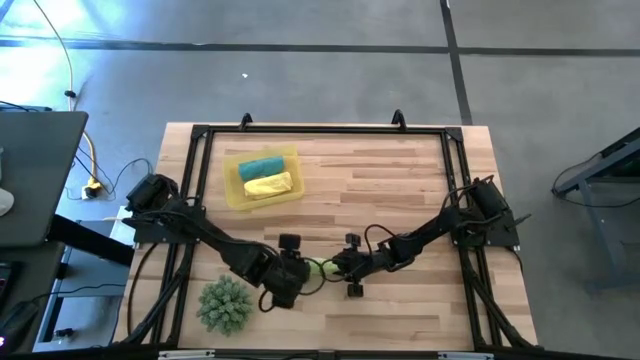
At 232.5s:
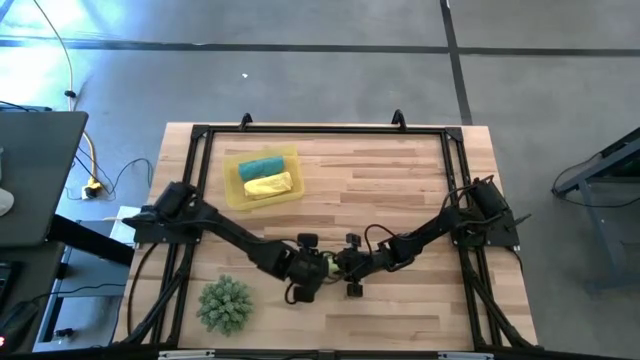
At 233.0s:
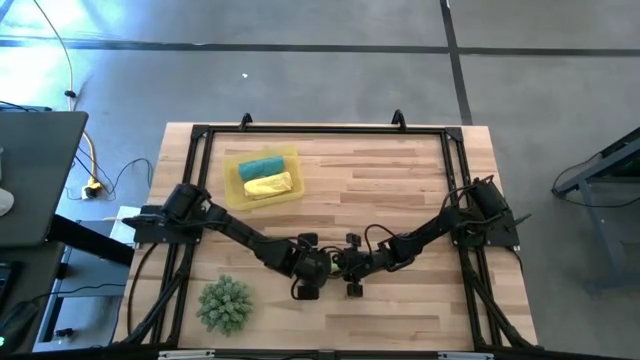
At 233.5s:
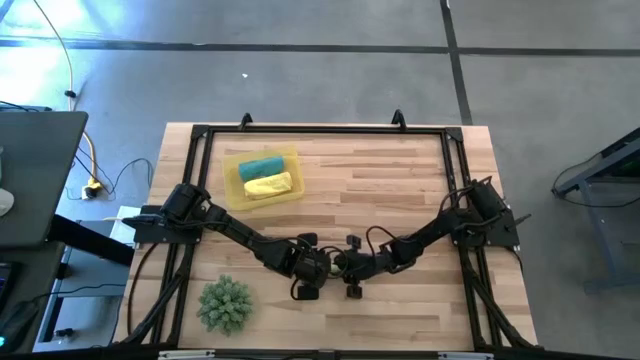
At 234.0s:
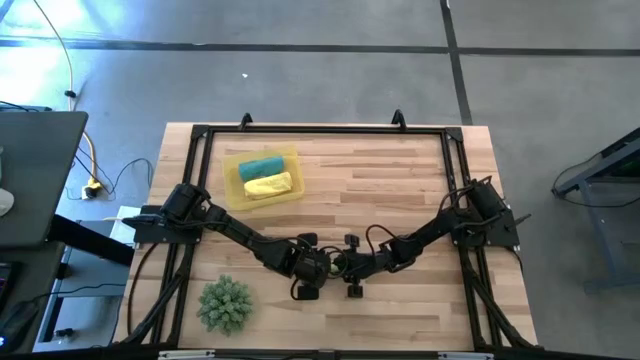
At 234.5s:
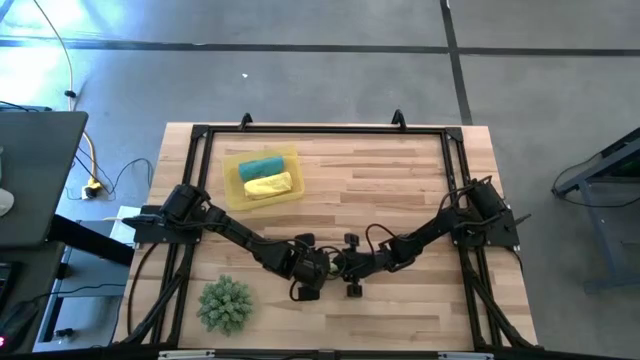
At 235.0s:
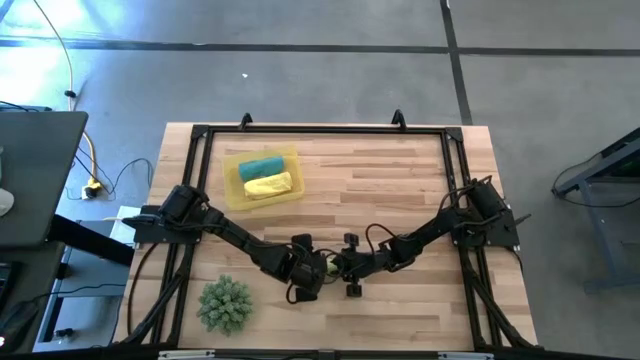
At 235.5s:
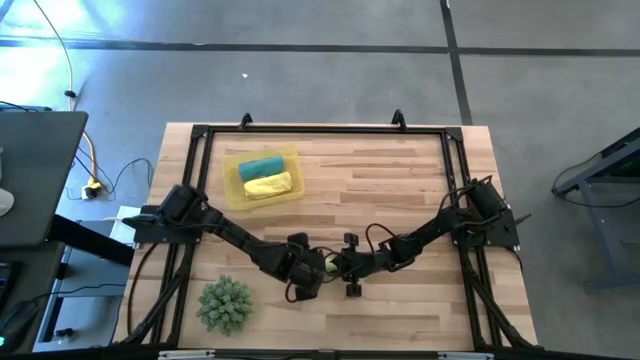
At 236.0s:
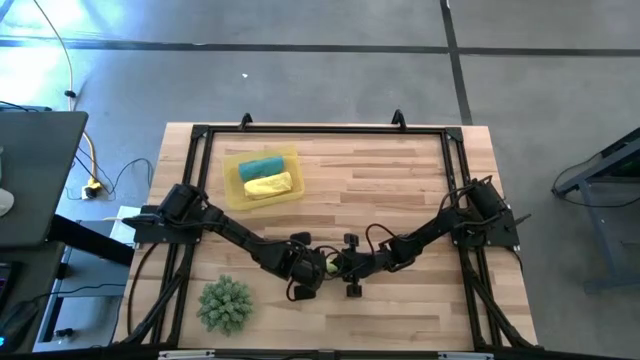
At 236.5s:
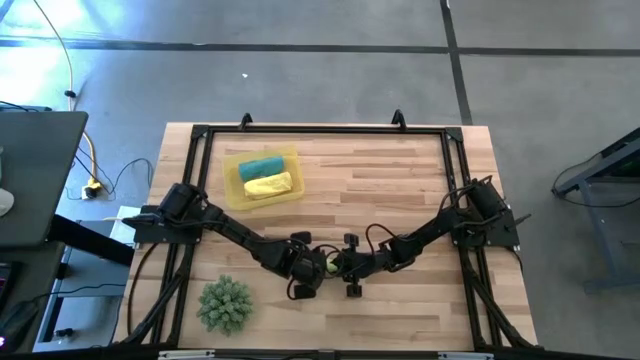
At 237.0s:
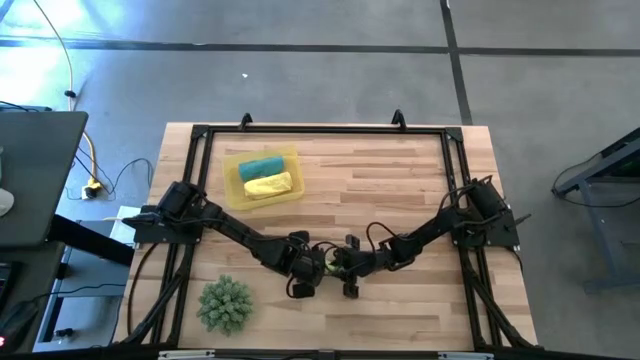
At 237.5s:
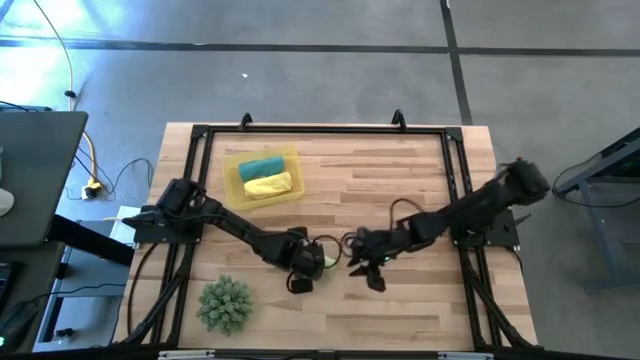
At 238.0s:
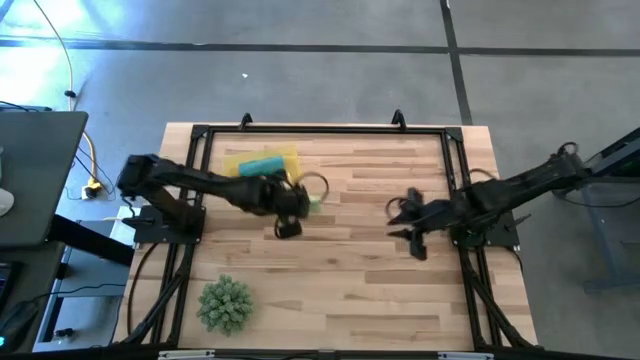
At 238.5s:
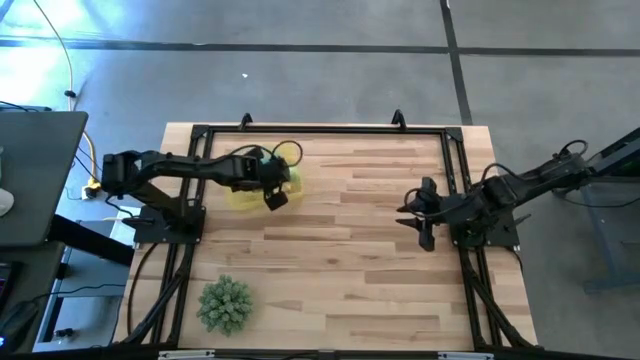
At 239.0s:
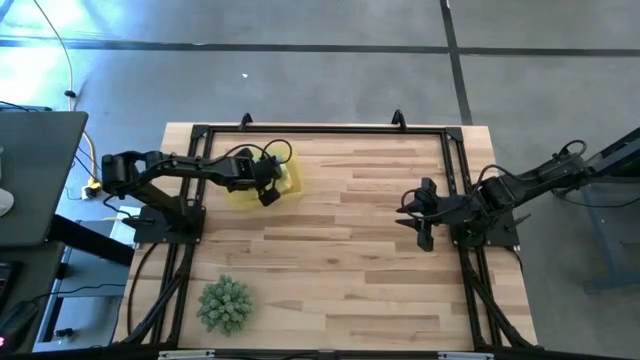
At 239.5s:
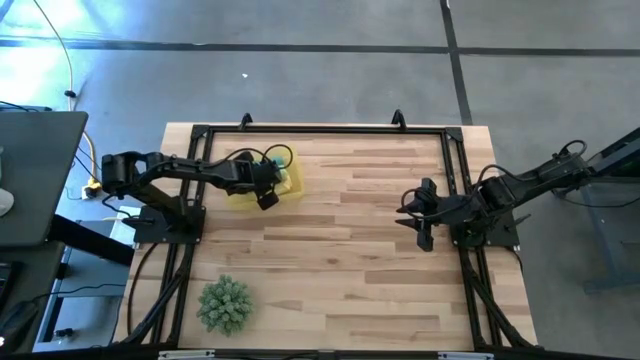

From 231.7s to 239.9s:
Task: Roll microfiber towels into tight, uniform cylinder then place into a basket
Put the green microfiber towel into the yellow bin

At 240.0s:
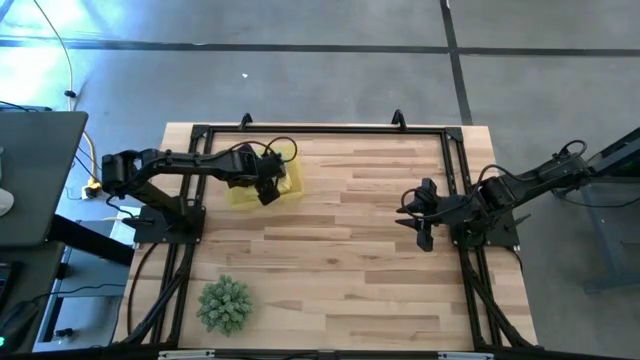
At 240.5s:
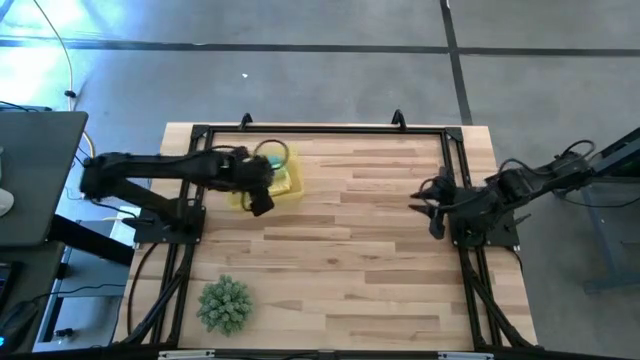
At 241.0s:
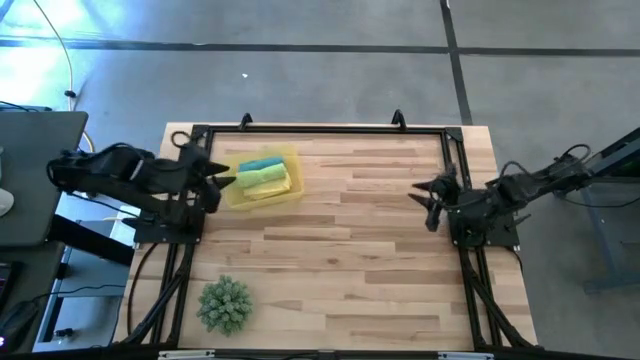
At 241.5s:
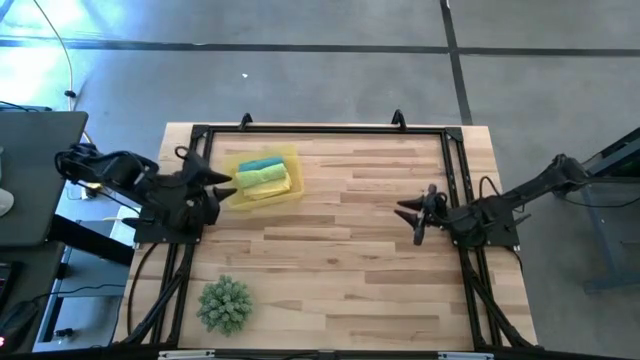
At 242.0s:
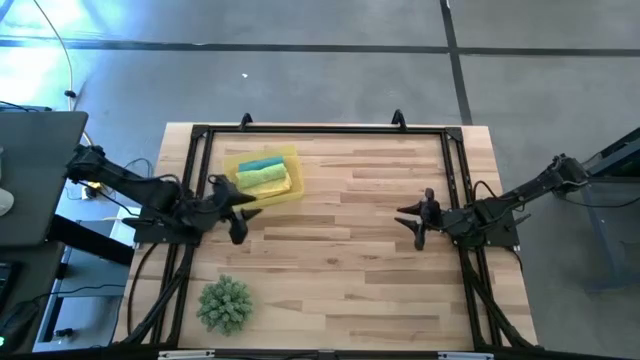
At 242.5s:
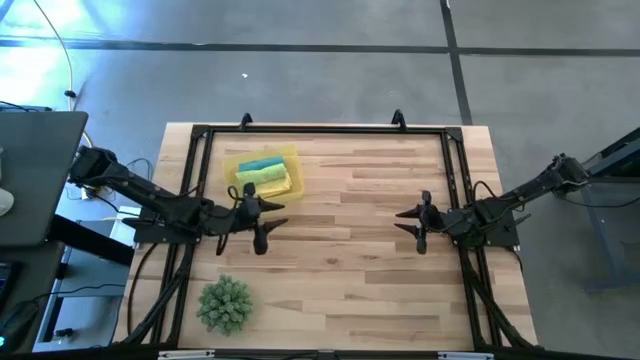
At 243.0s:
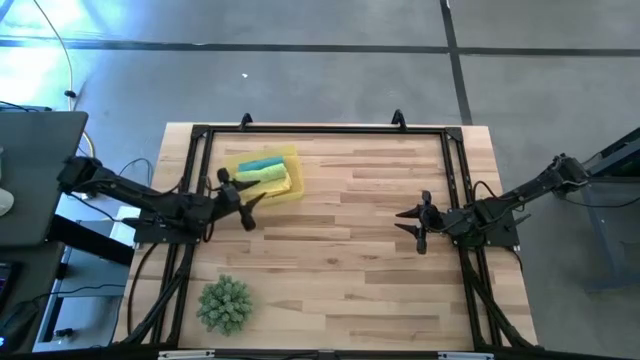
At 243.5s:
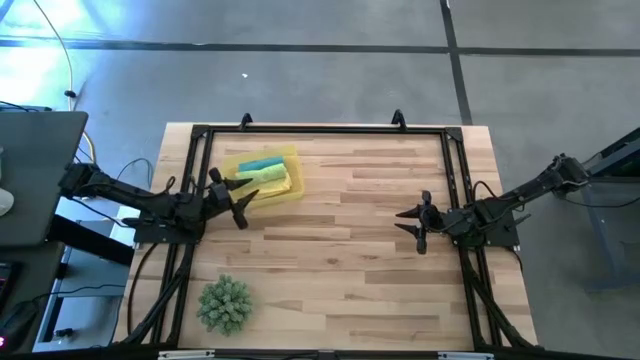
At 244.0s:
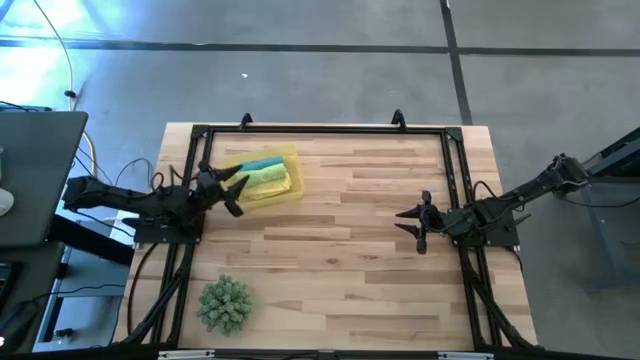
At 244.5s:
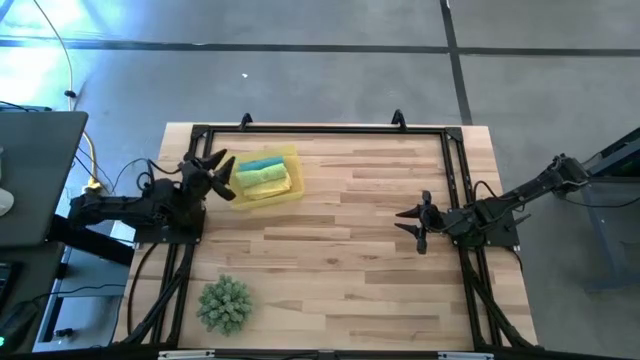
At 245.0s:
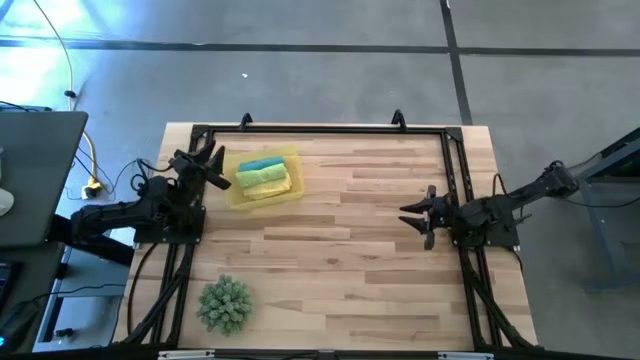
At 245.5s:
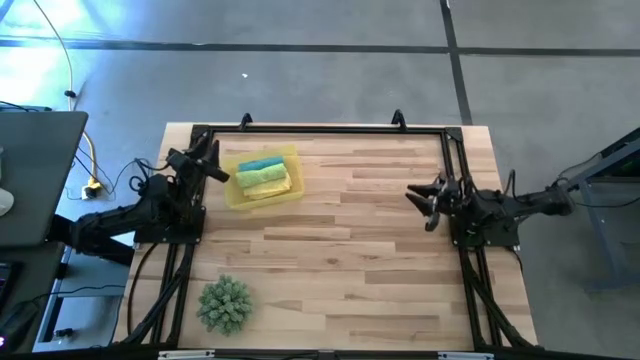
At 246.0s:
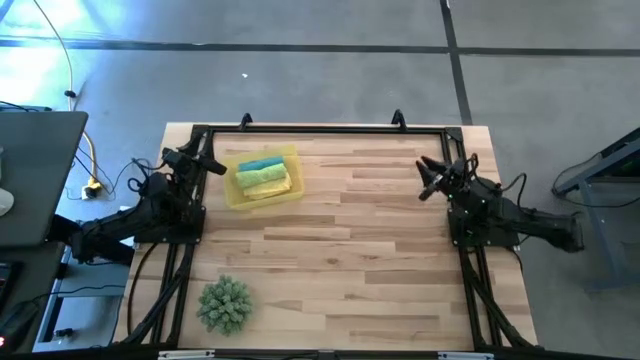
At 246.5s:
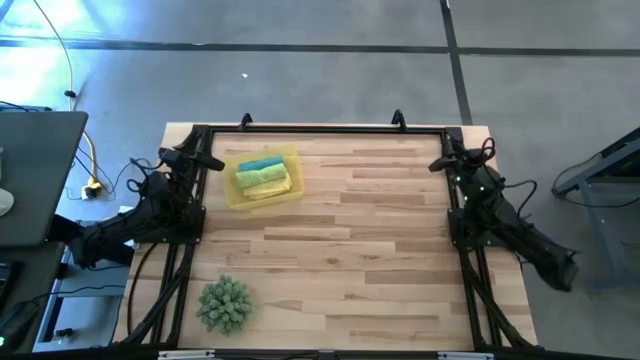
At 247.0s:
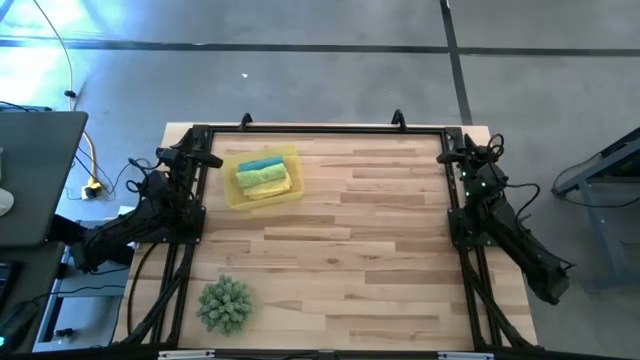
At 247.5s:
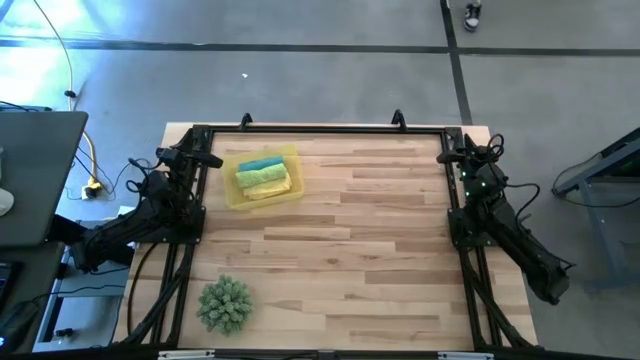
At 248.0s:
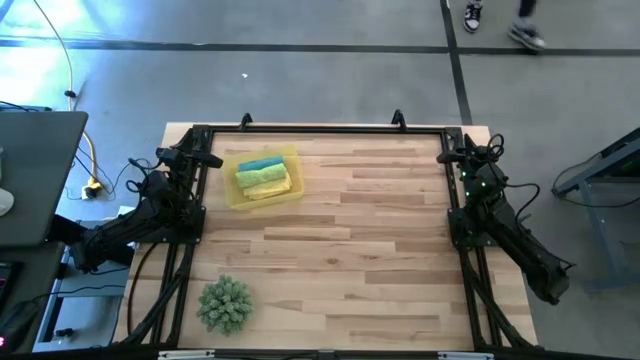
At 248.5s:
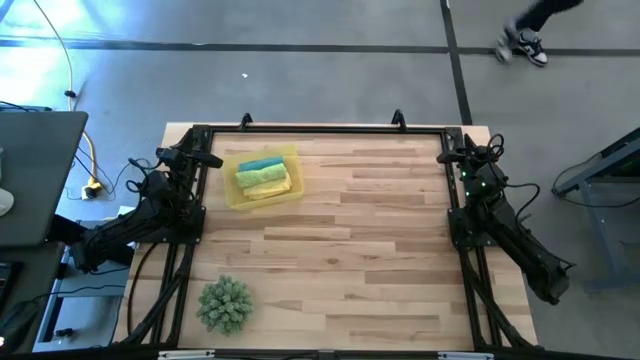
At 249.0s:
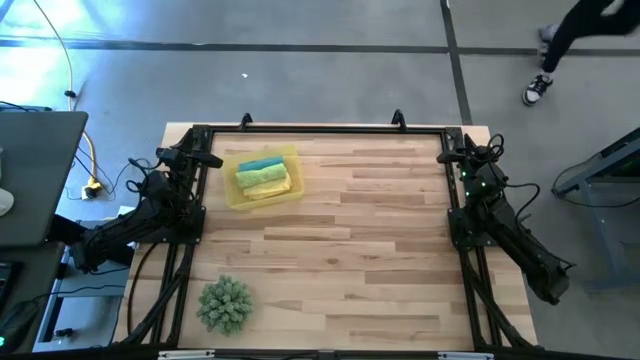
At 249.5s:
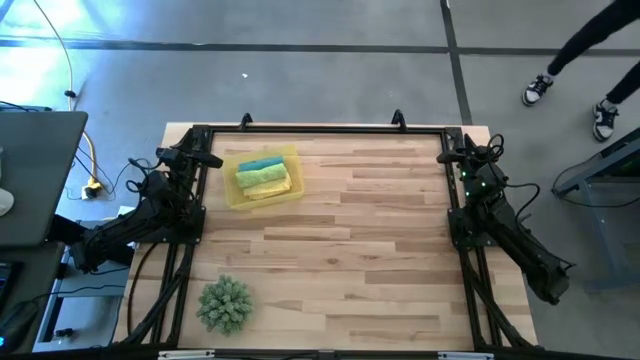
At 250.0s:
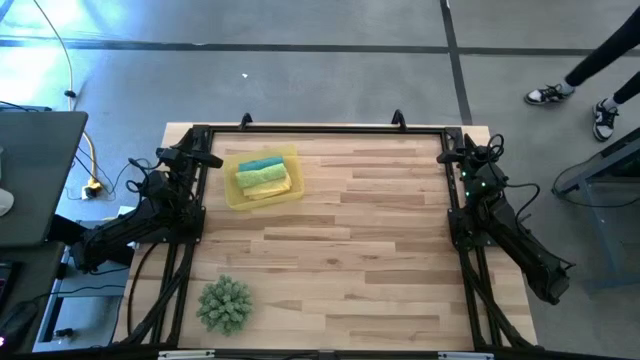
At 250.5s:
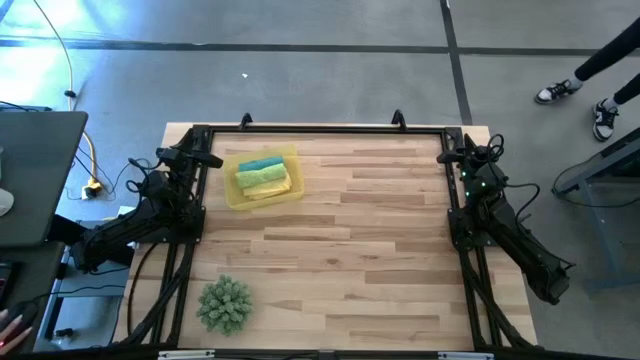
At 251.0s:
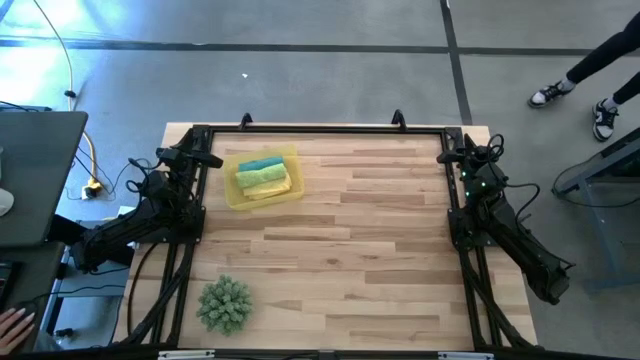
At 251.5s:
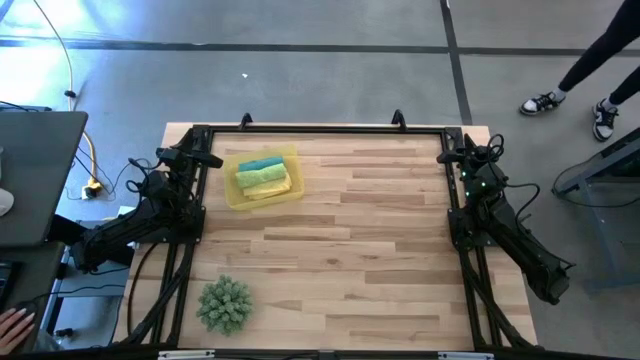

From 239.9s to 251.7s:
Return to home position

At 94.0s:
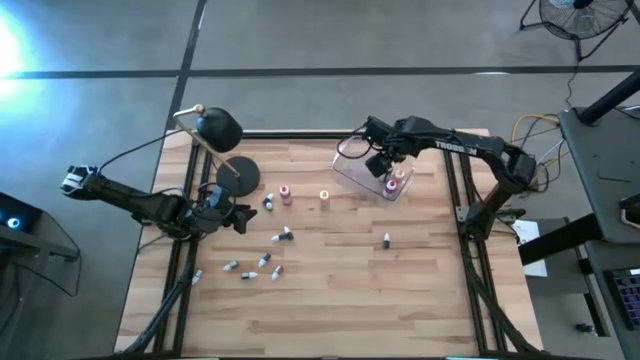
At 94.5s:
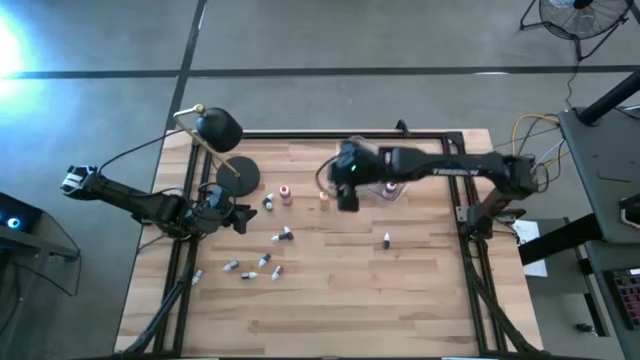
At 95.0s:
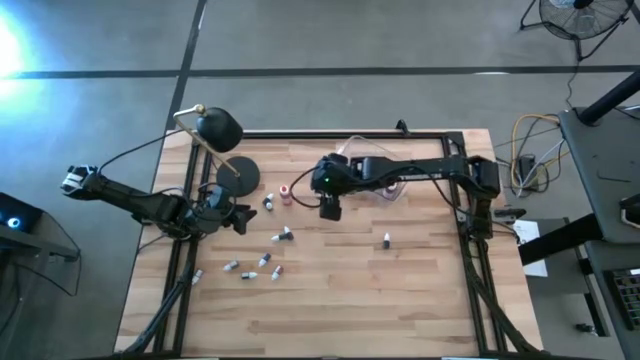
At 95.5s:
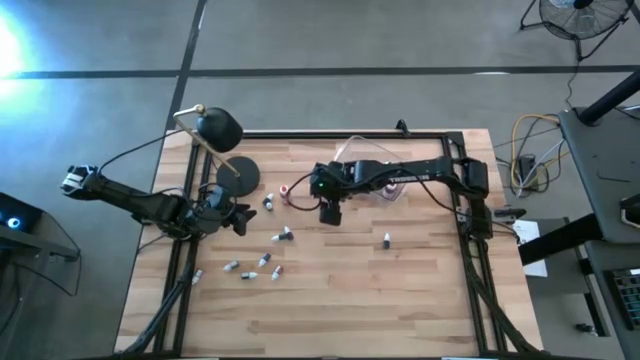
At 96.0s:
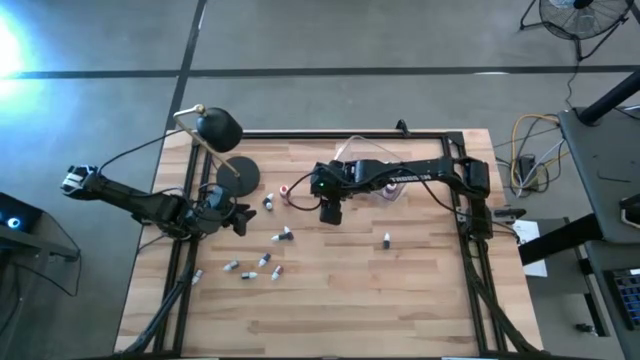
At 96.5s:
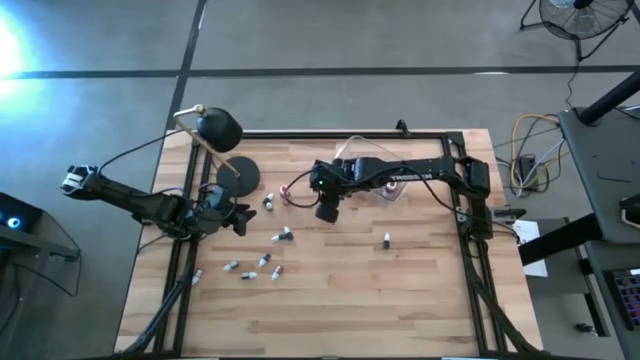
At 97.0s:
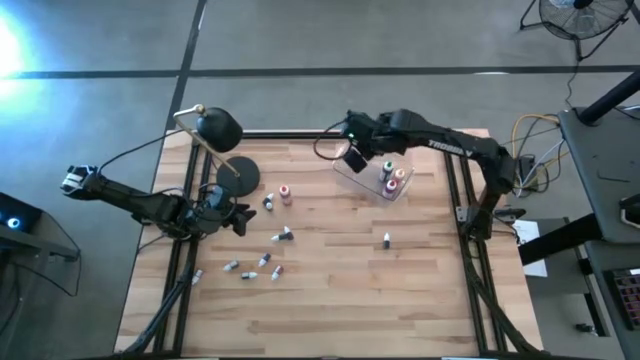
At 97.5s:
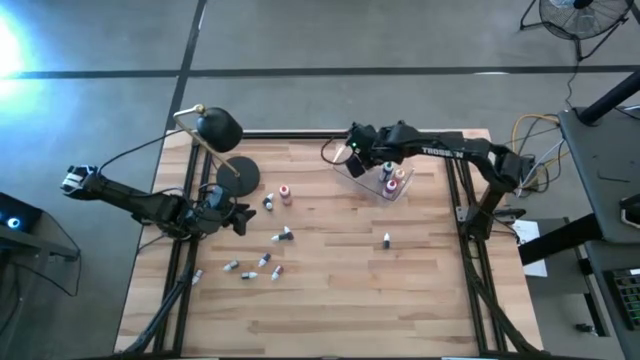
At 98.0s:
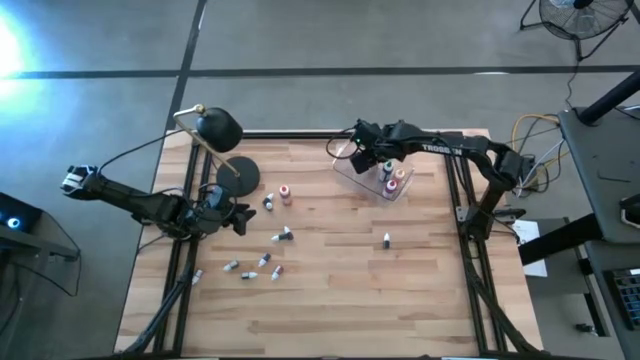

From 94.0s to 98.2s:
Task: Pick & Place food coloring
Put the large yellow food coloring bottle into the transparent bin
